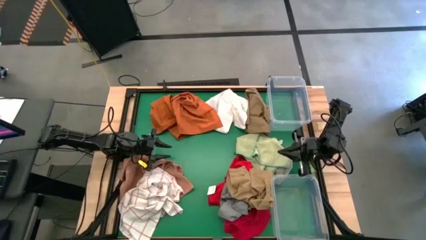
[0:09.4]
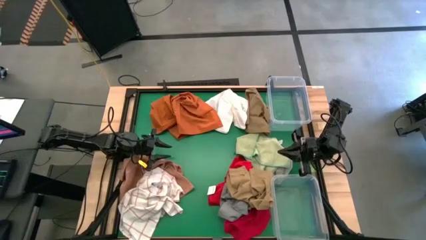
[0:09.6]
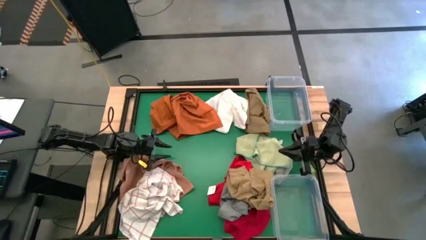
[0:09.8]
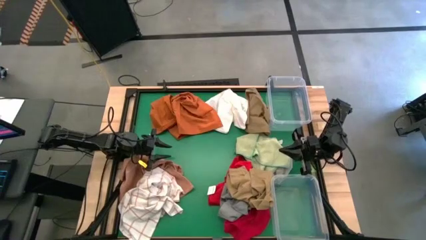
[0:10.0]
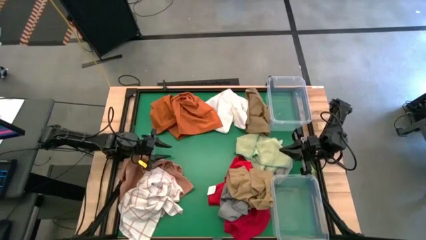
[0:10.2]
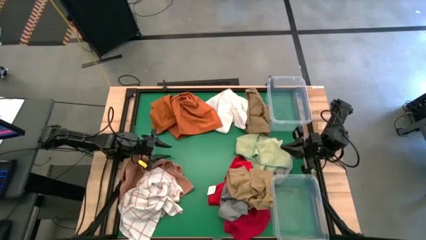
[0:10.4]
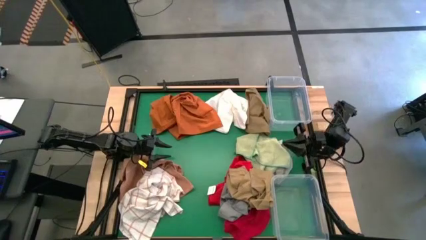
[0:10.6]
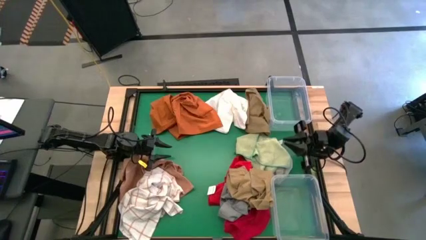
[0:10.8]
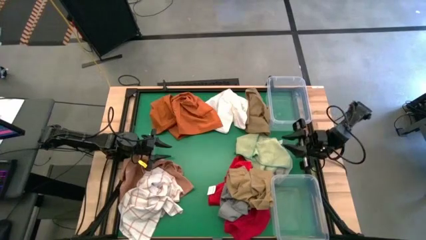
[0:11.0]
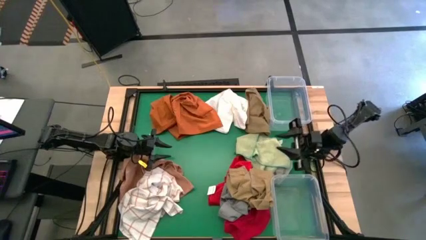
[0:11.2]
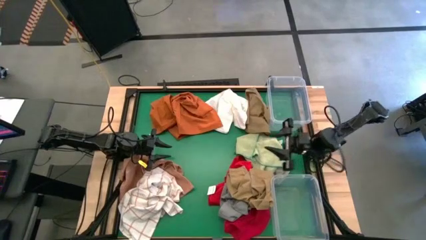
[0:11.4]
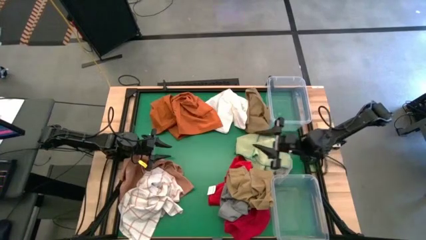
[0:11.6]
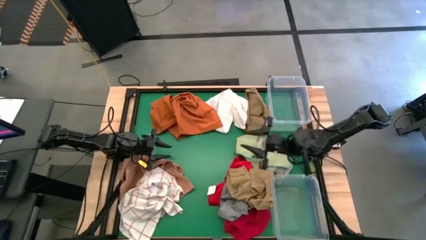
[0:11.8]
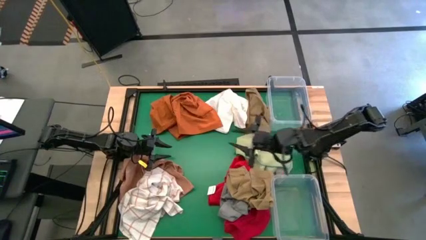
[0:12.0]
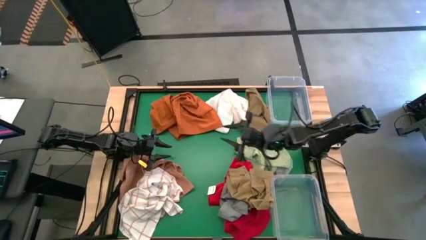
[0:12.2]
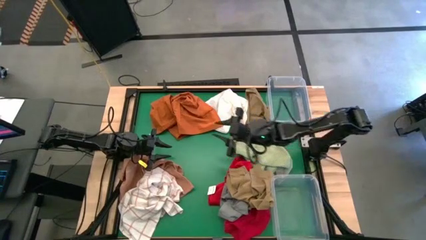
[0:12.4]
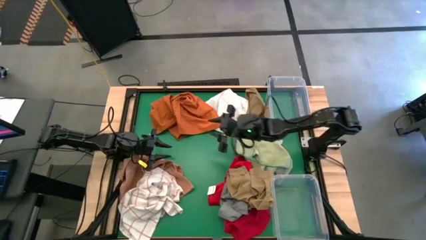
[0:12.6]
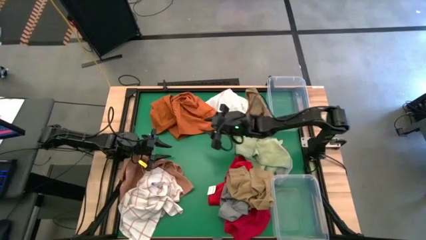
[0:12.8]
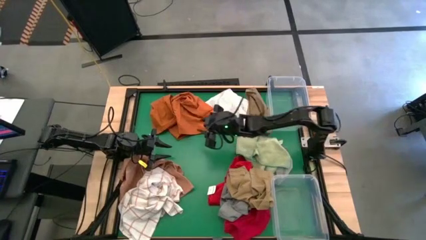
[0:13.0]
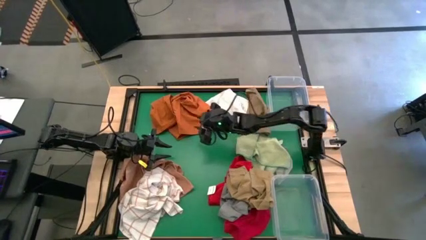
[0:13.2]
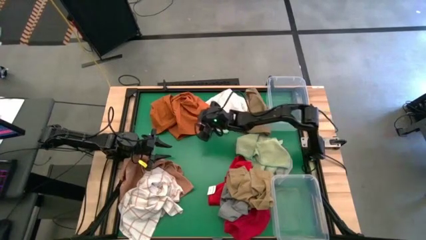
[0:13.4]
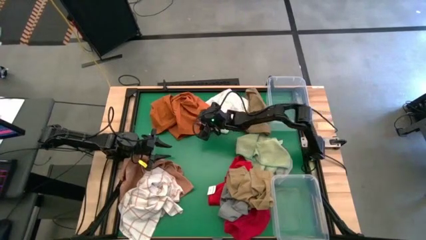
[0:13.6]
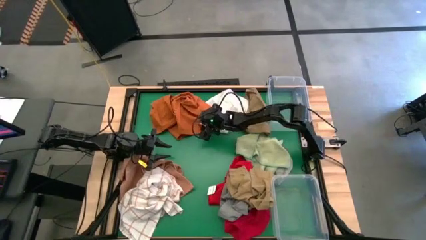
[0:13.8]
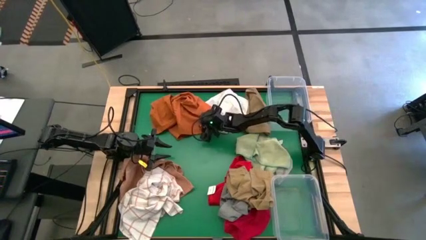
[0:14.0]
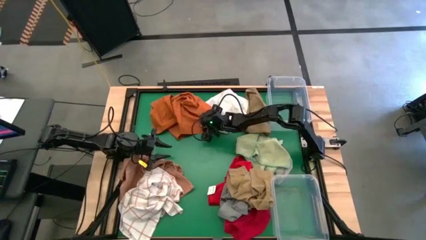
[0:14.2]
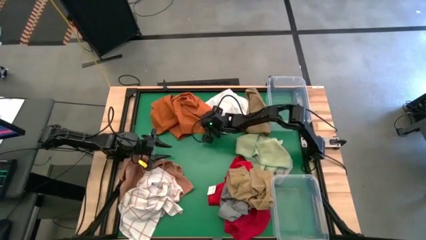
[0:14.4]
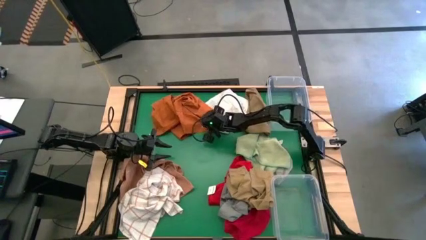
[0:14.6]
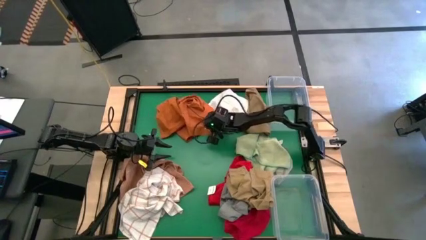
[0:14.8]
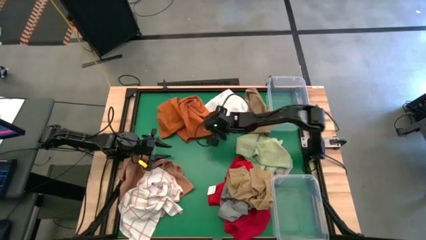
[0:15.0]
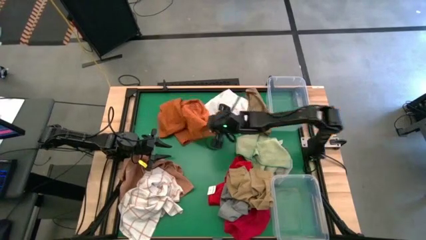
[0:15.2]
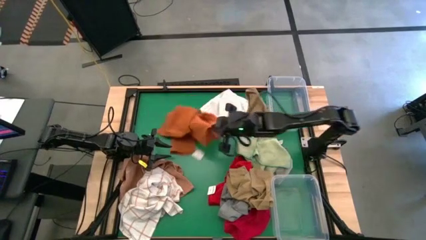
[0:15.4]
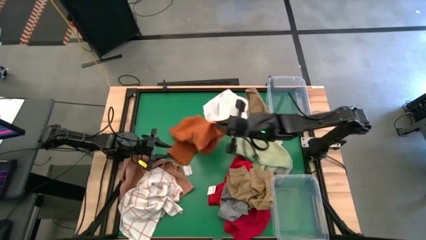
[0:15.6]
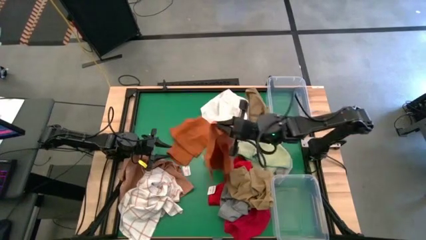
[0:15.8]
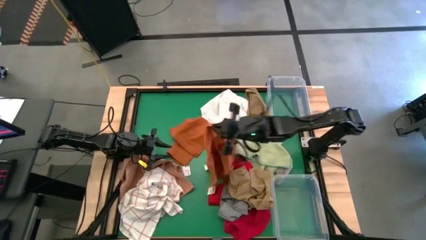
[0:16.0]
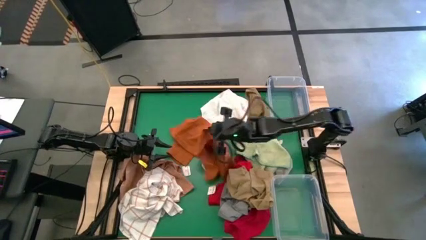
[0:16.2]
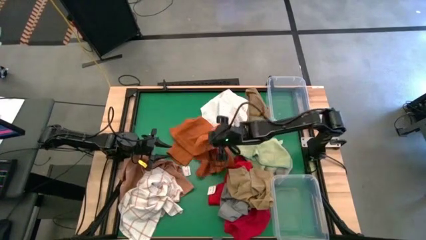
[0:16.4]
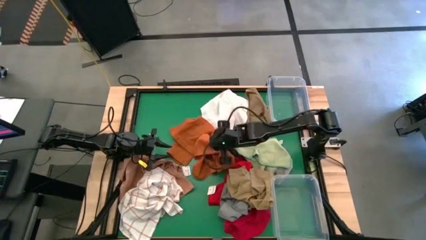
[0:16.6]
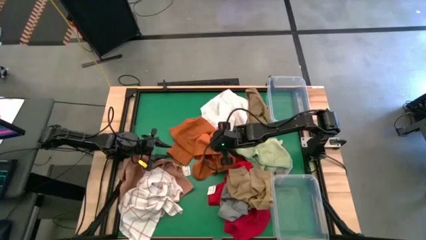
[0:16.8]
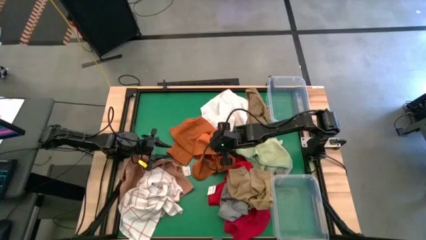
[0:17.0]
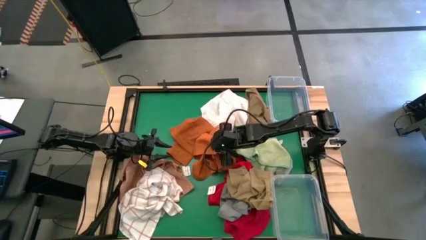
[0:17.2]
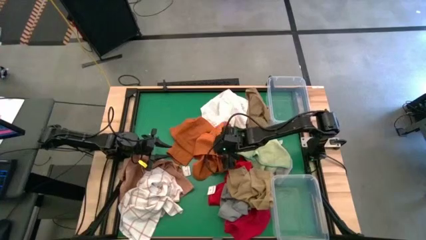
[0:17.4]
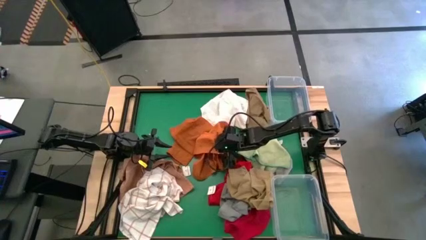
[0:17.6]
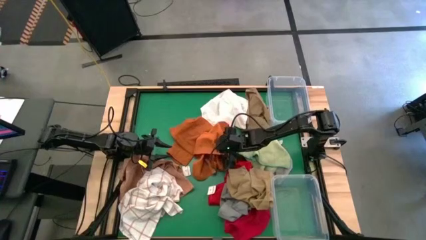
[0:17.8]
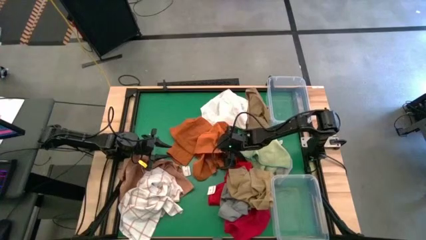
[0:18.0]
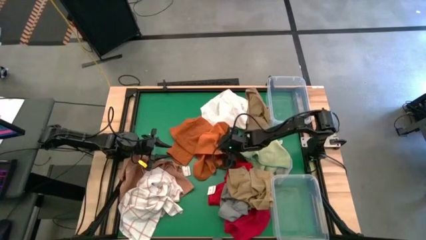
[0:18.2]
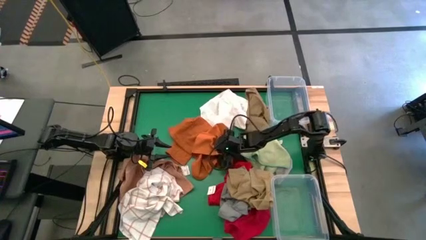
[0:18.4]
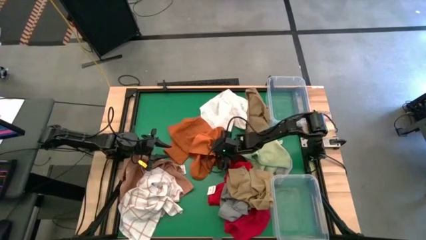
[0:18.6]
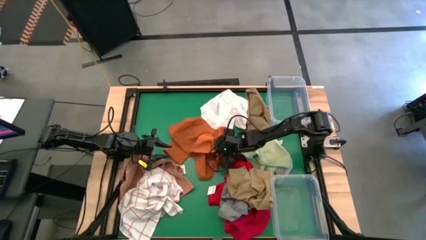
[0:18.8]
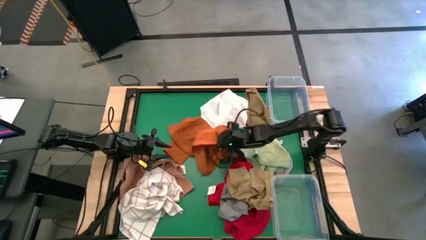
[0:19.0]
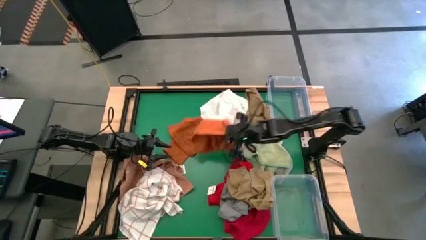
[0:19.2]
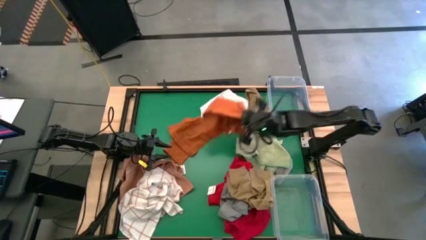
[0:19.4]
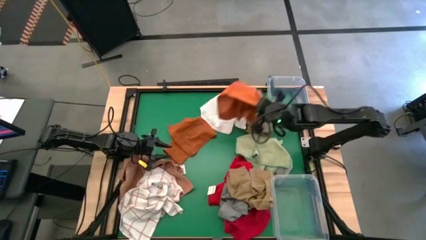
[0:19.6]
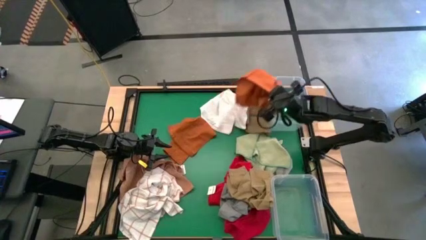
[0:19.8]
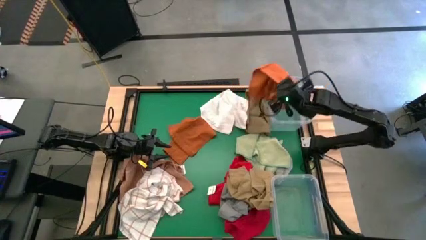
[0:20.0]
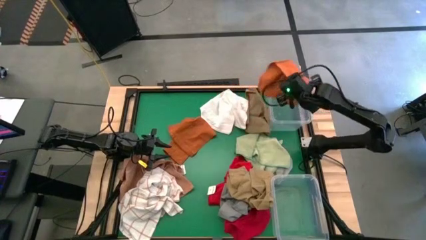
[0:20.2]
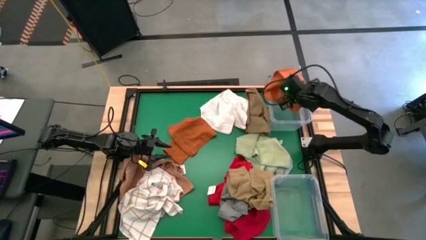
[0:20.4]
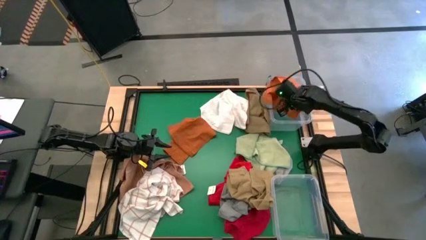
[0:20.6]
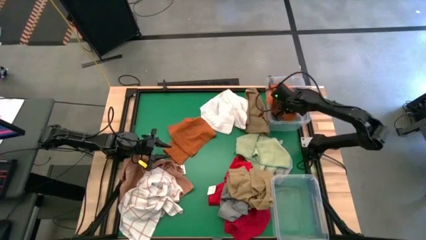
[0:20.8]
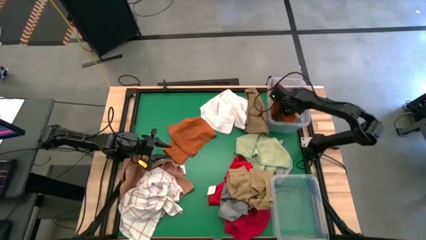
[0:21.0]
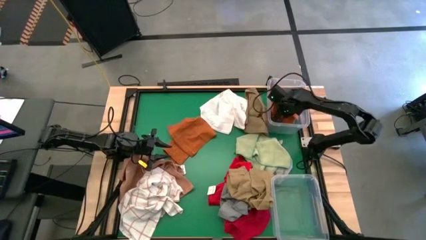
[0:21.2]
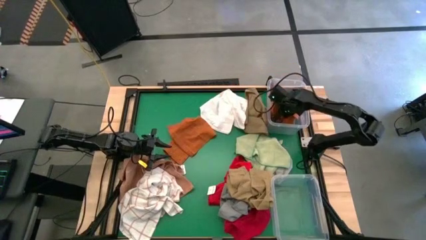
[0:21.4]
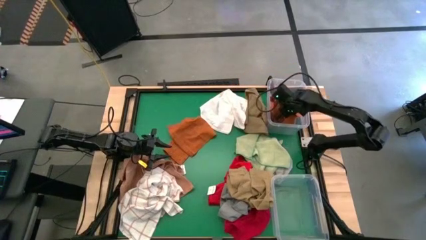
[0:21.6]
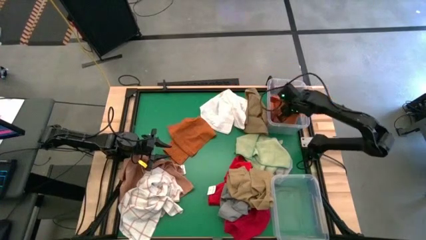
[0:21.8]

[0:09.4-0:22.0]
Task: Sort towels by color in basket
Put the right orange towel into the top transparent bin

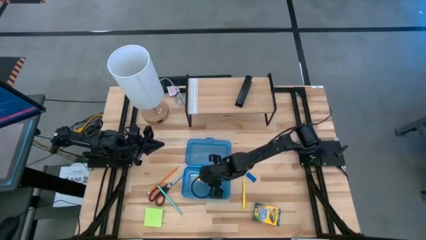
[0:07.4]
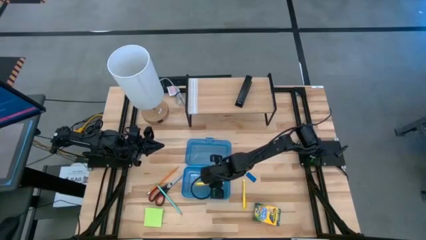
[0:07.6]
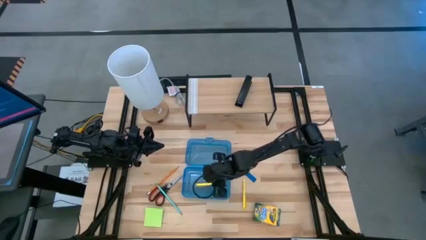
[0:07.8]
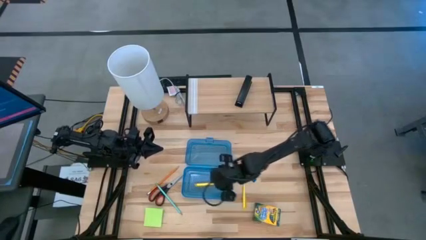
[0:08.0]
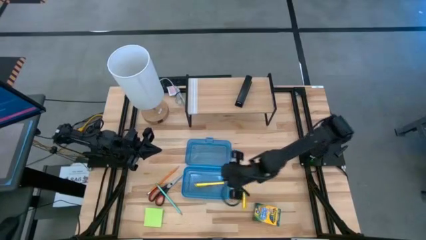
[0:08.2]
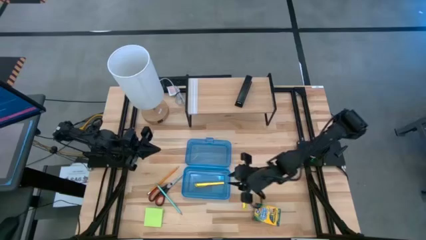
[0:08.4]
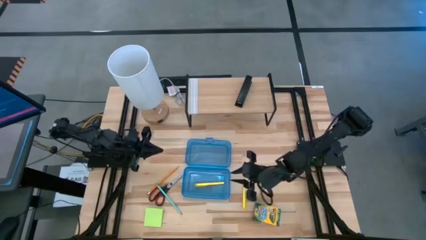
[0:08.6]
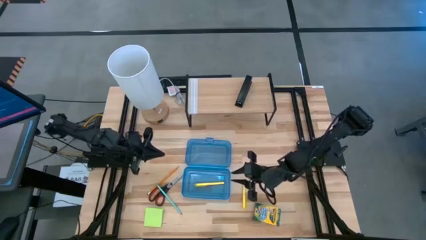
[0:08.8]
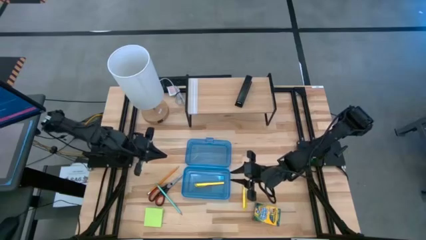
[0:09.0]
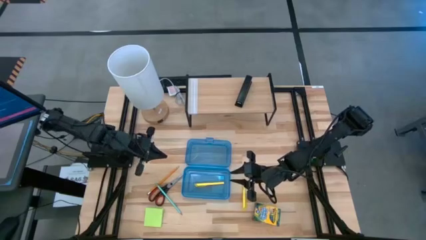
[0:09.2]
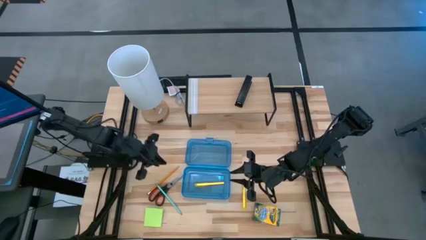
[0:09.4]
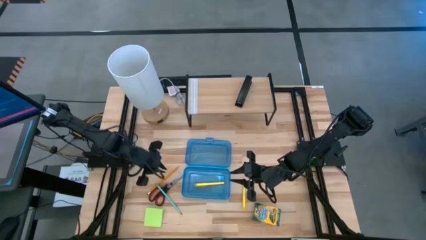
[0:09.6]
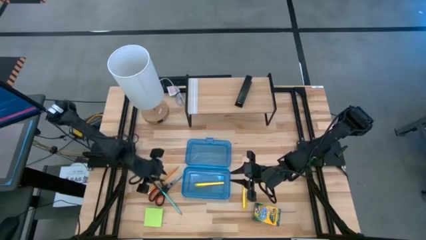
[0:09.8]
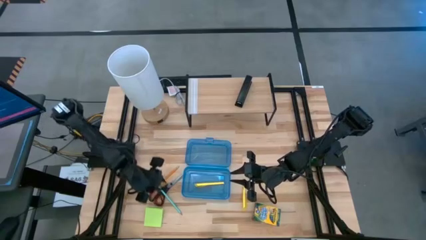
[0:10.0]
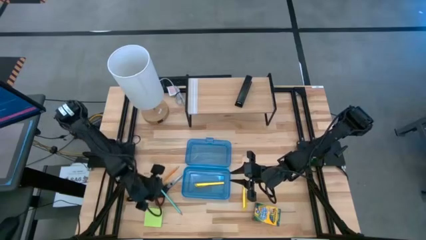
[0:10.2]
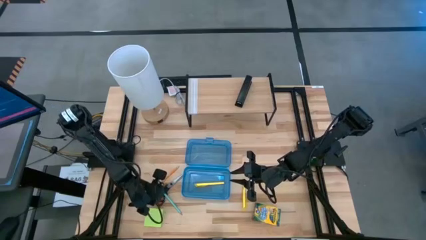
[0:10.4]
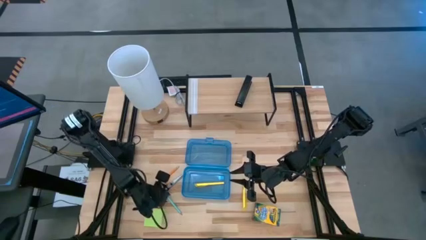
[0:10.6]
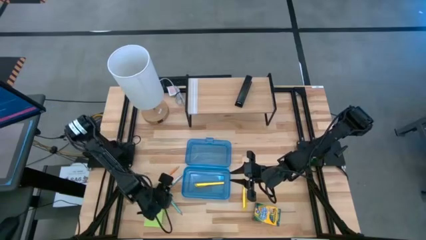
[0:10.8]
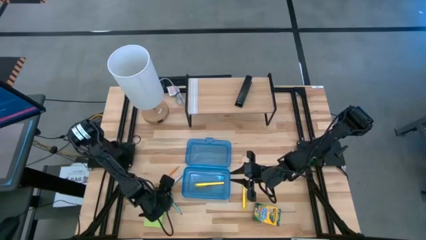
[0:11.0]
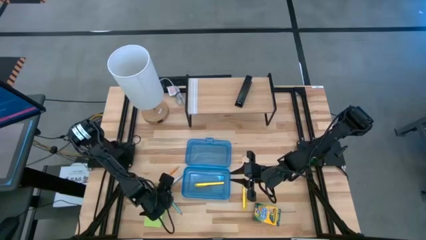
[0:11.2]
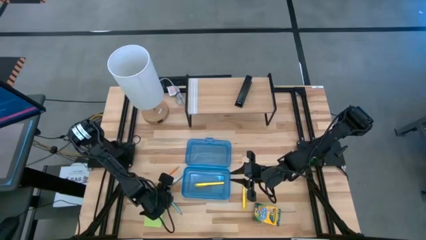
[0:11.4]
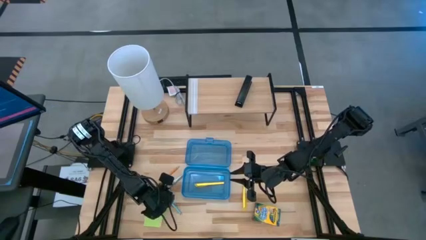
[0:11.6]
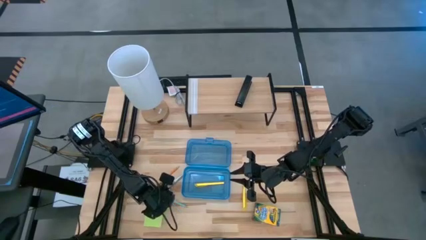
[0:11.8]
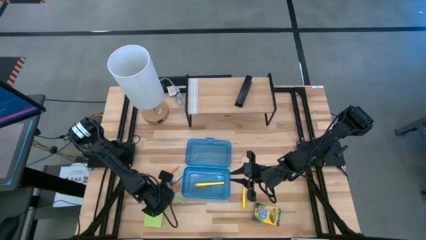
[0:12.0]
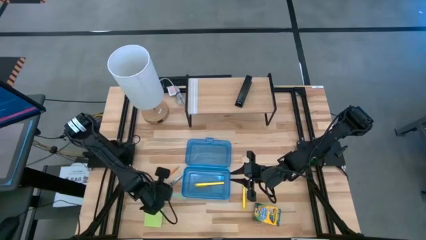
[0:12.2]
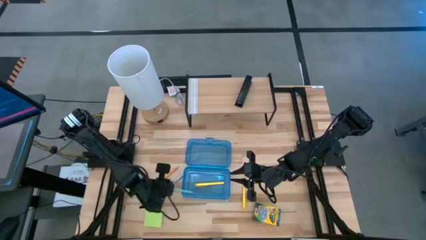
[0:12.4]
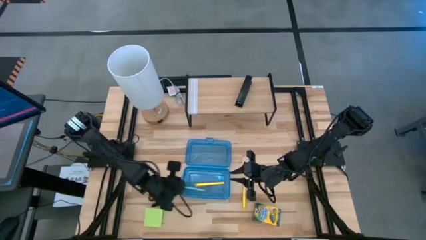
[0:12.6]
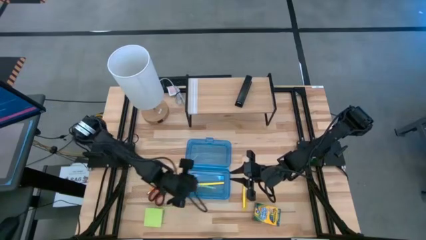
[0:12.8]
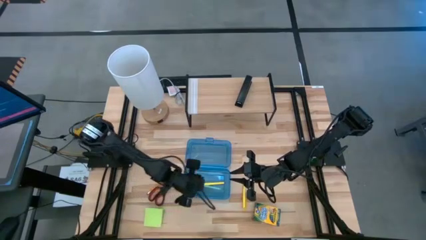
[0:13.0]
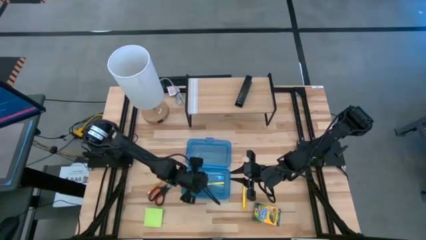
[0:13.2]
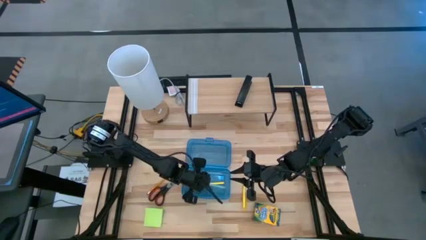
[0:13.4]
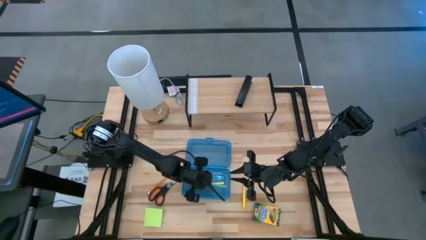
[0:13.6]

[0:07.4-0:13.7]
Task: Pack school essentials
Put the light blue pencil into the supply box
